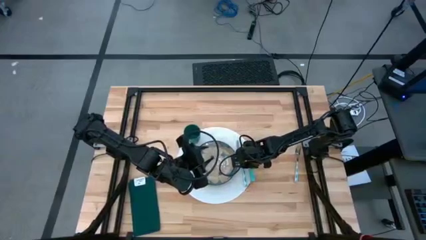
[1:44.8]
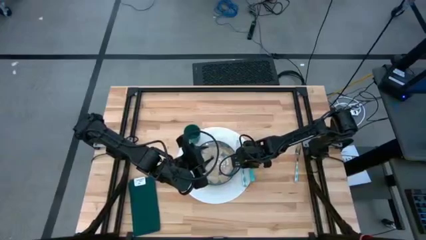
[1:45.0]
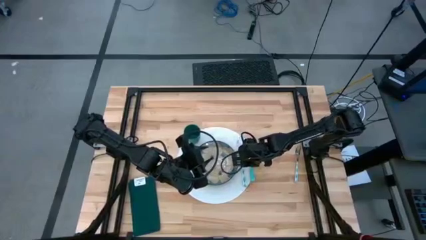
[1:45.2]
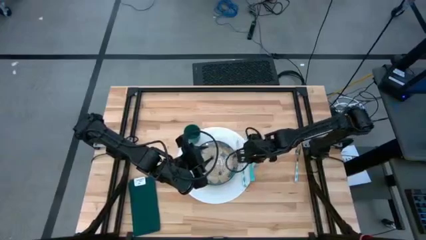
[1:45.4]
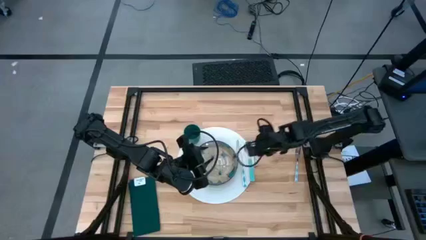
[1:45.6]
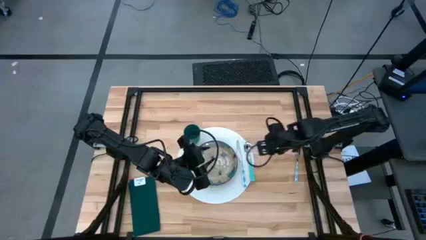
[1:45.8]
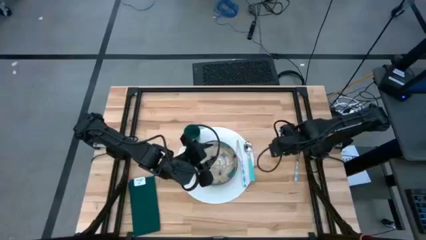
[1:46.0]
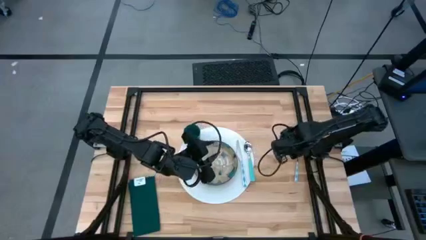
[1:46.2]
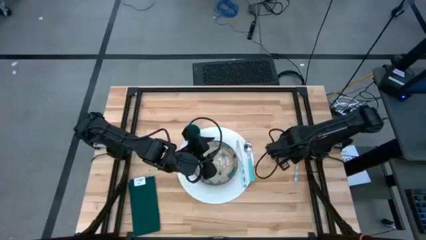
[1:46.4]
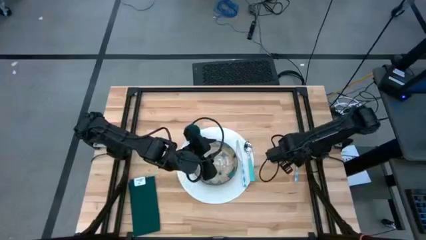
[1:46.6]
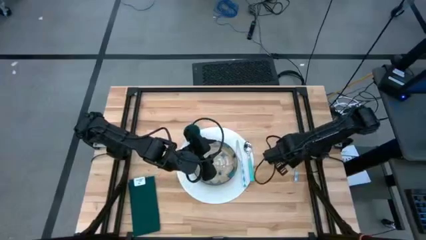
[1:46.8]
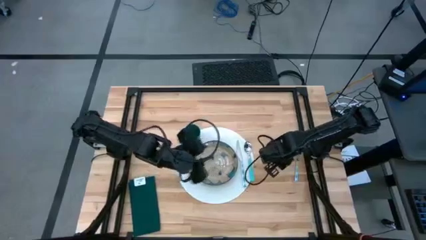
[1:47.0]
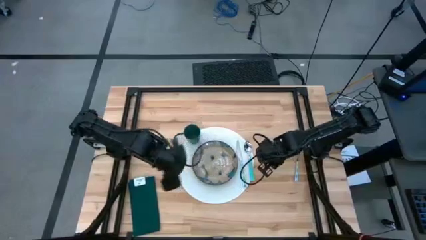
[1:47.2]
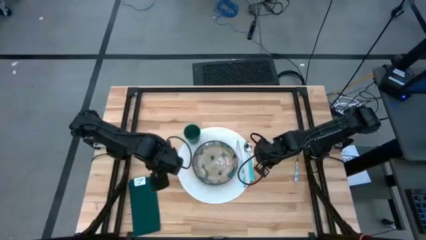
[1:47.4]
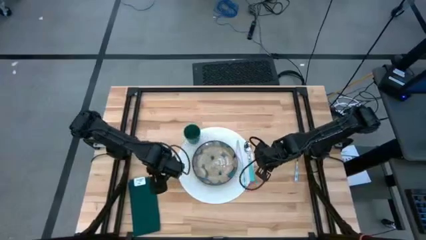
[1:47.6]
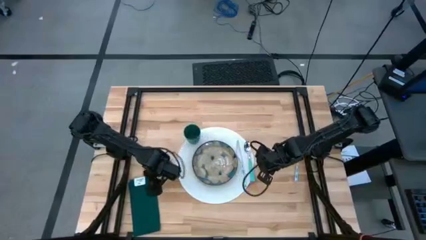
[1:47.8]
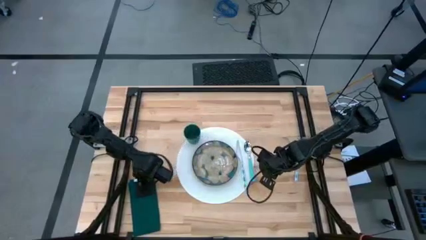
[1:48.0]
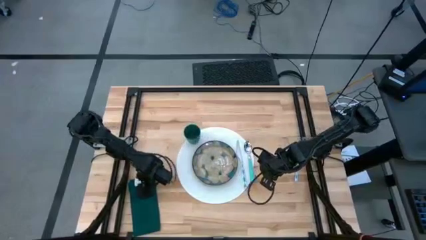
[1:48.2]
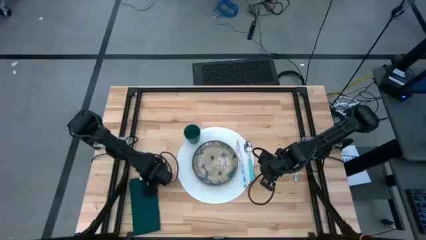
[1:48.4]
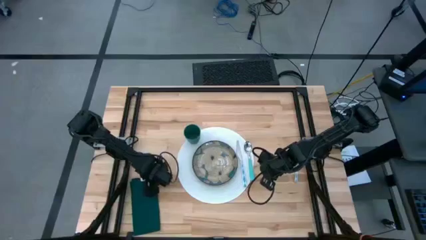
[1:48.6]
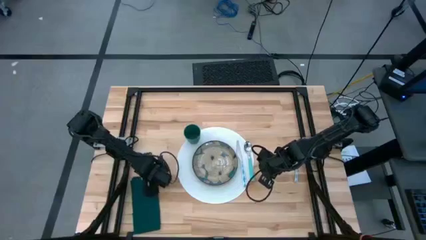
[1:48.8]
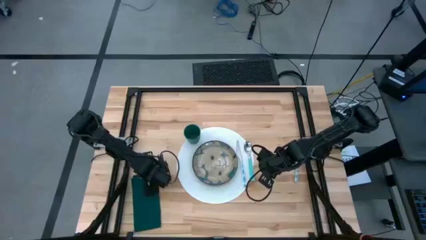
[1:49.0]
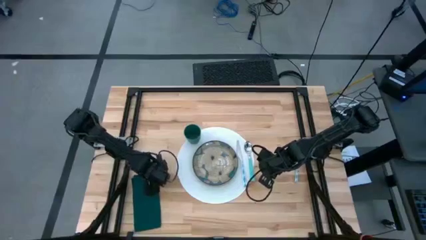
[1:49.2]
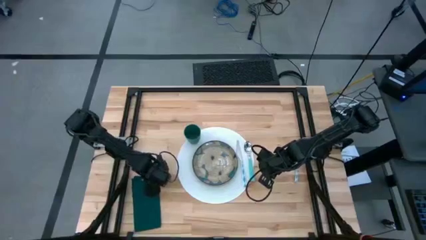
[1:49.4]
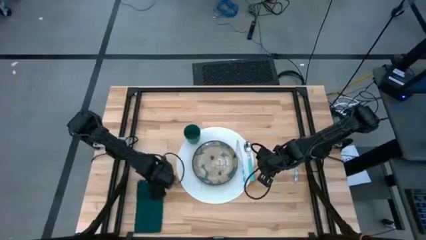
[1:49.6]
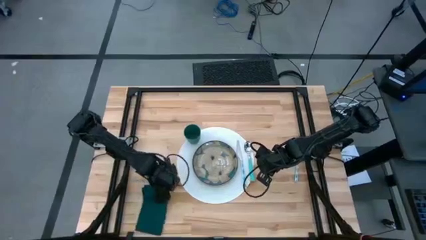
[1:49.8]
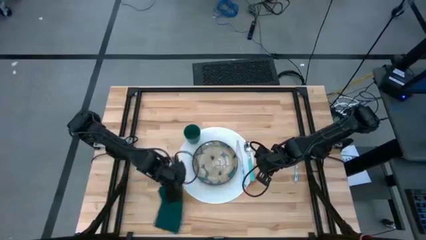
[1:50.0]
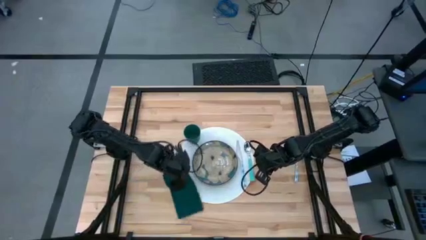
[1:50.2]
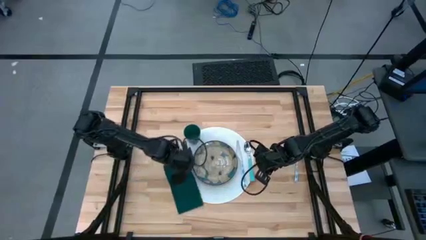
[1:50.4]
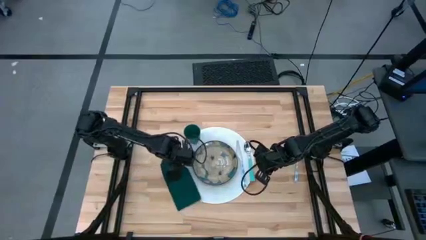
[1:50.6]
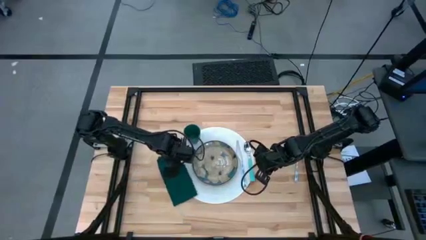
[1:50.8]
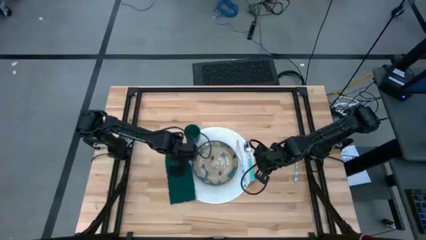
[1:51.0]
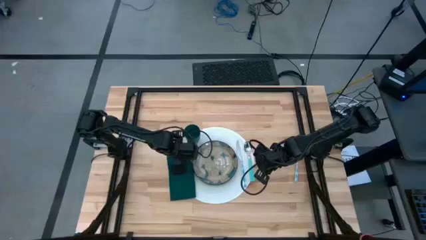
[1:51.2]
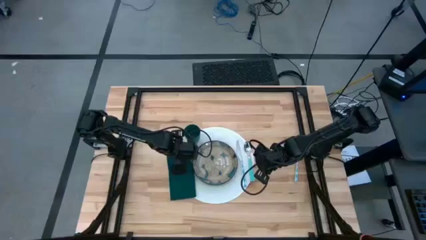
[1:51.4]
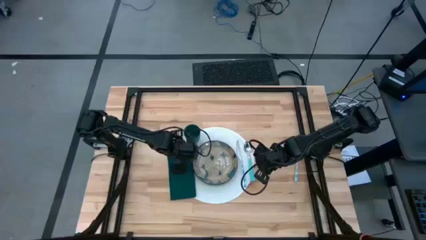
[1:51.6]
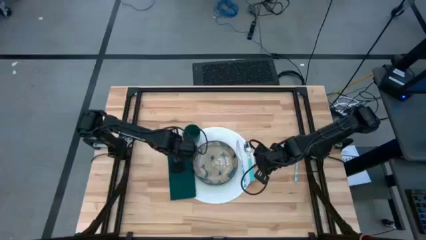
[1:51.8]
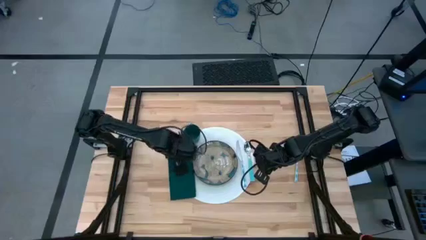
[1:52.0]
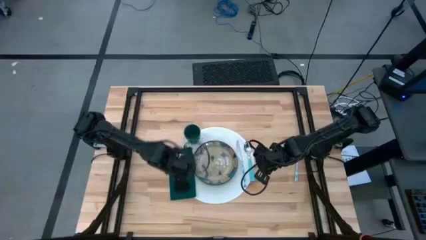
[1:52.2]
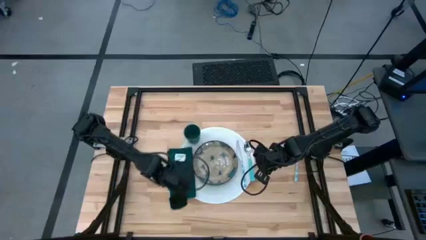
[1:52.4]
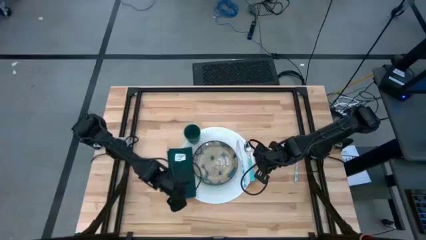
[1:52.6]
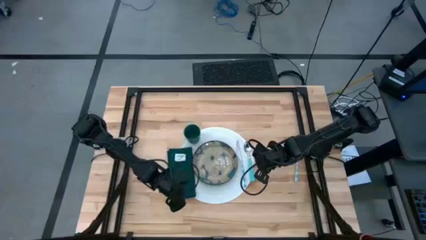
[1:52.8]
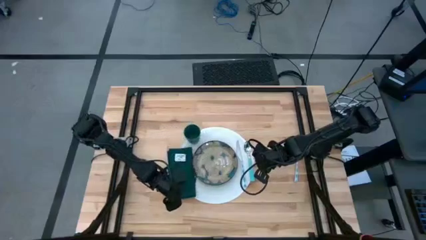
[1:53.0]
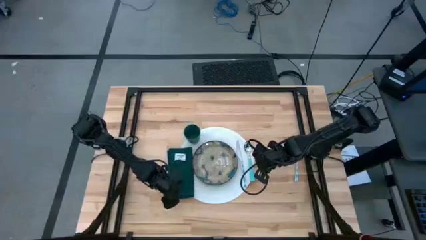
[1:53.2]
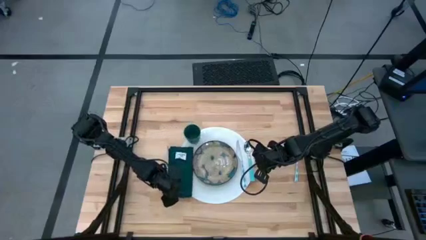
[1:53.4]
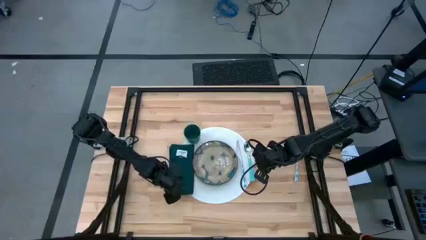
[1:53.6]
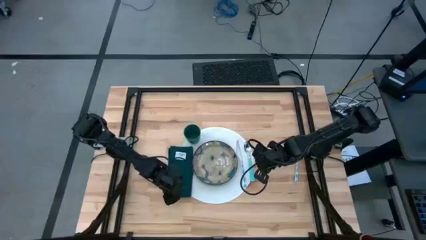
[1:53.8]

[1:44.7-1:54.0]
Task: Set table place
Put the dark green napkin on the left of the white table mat
